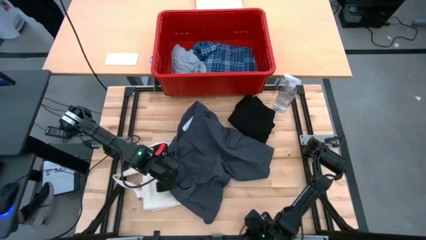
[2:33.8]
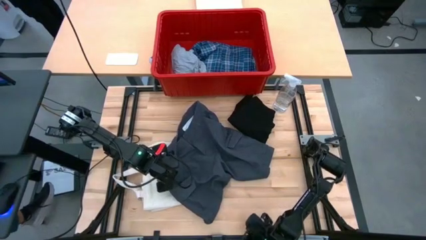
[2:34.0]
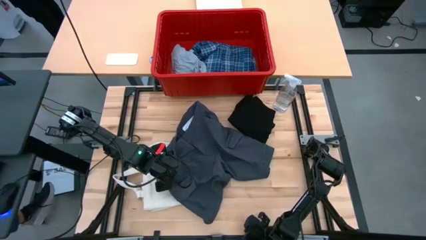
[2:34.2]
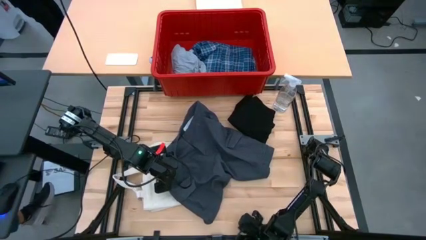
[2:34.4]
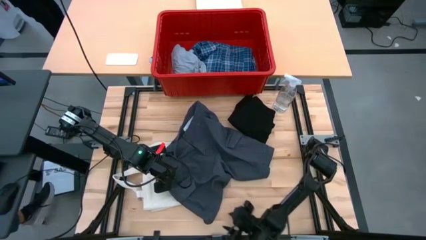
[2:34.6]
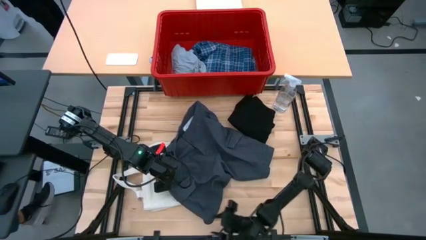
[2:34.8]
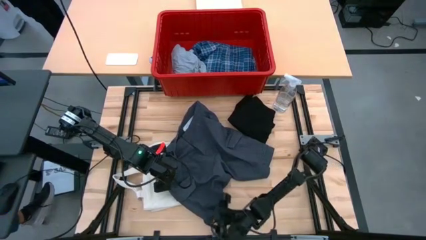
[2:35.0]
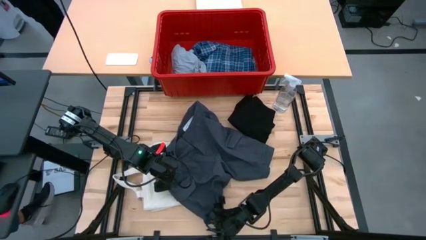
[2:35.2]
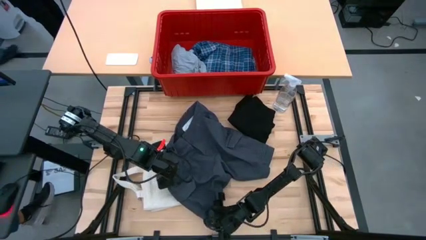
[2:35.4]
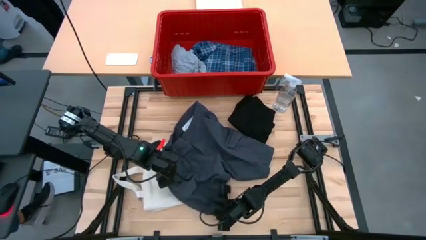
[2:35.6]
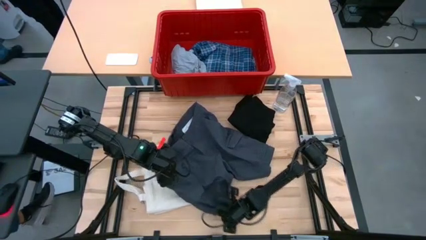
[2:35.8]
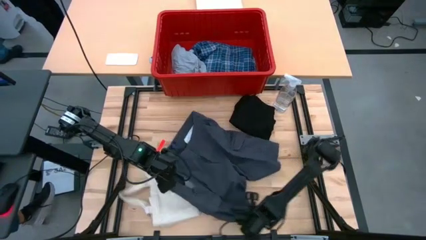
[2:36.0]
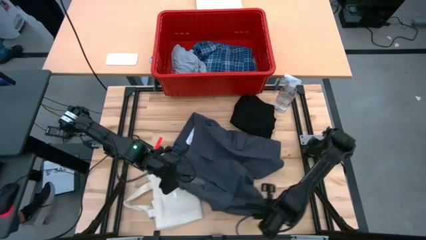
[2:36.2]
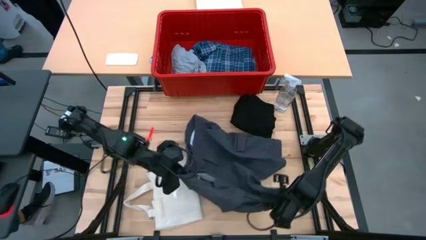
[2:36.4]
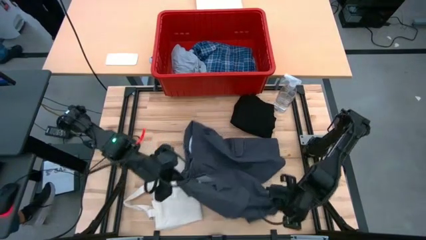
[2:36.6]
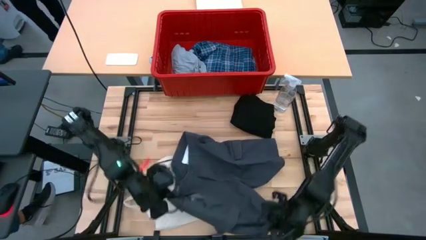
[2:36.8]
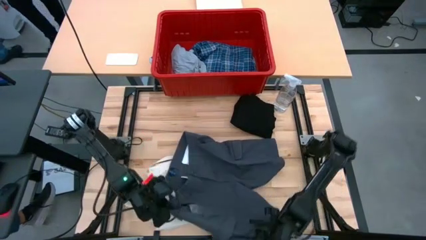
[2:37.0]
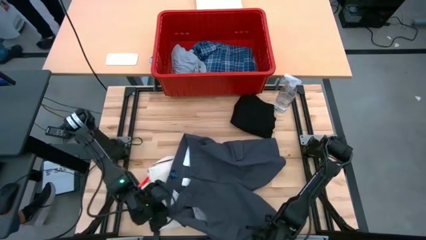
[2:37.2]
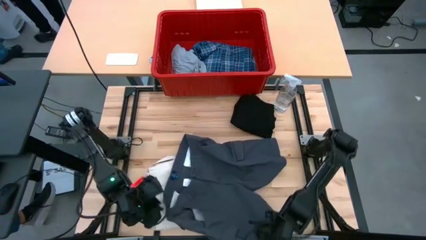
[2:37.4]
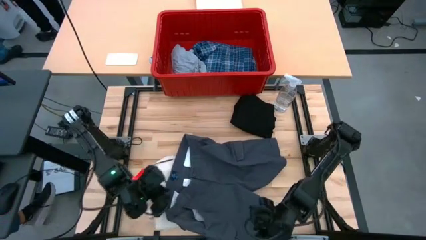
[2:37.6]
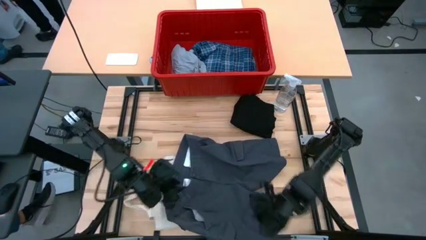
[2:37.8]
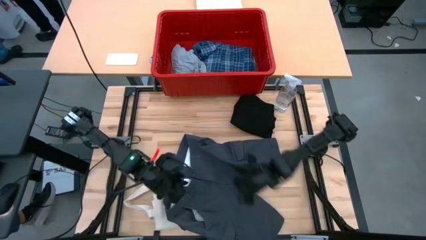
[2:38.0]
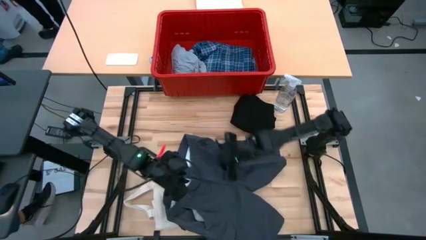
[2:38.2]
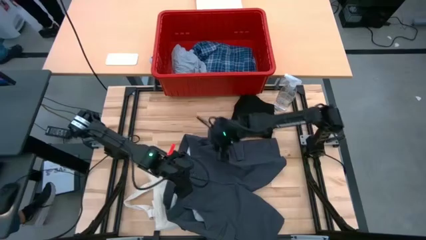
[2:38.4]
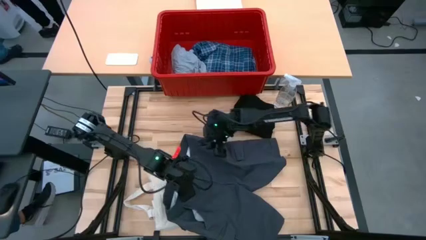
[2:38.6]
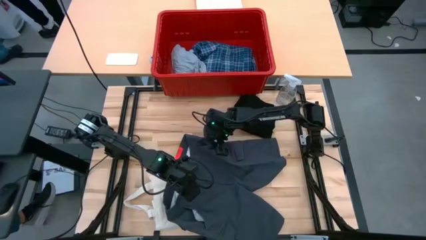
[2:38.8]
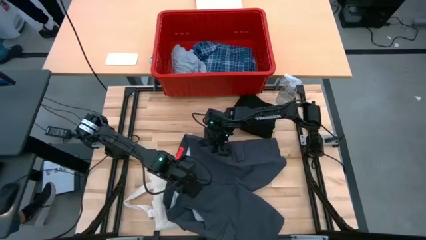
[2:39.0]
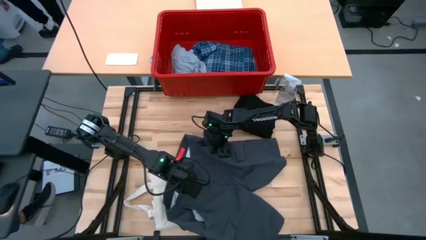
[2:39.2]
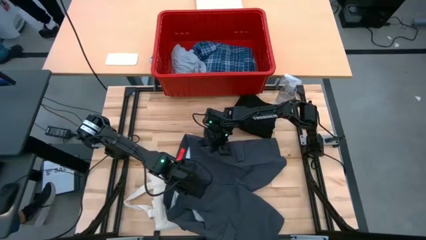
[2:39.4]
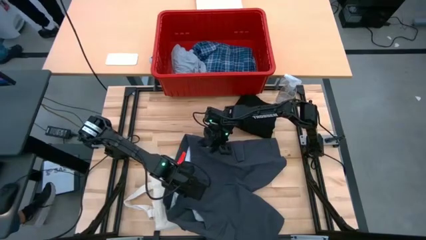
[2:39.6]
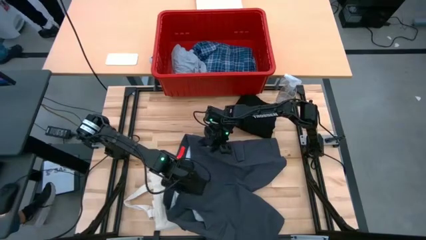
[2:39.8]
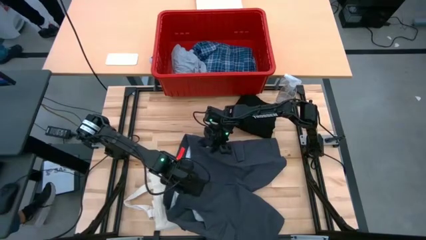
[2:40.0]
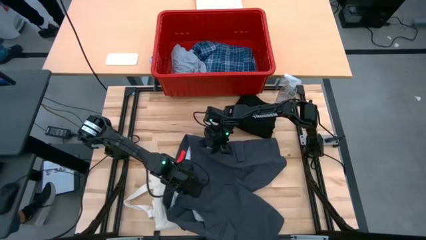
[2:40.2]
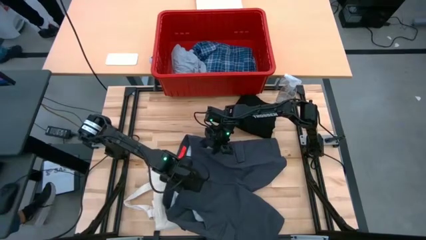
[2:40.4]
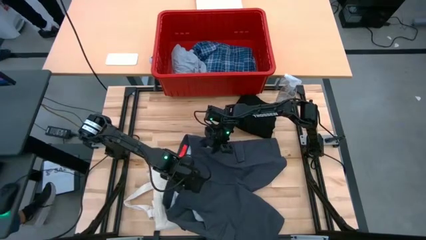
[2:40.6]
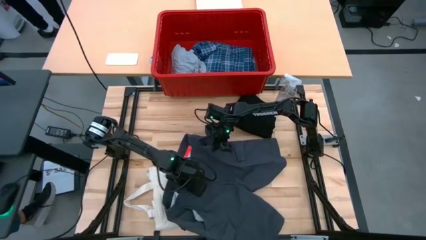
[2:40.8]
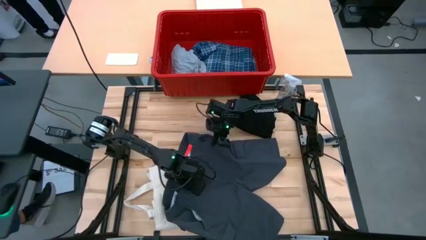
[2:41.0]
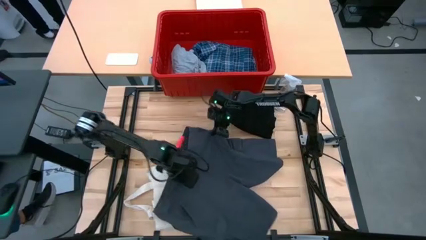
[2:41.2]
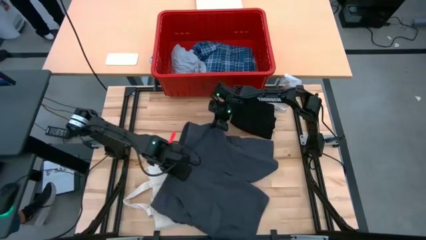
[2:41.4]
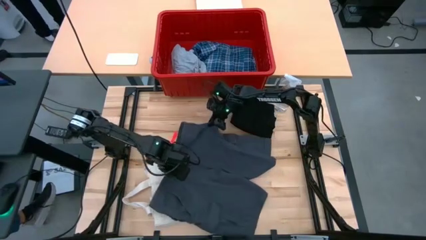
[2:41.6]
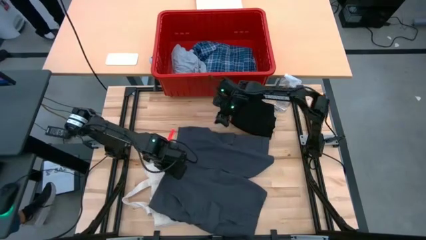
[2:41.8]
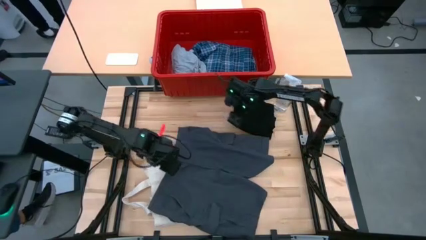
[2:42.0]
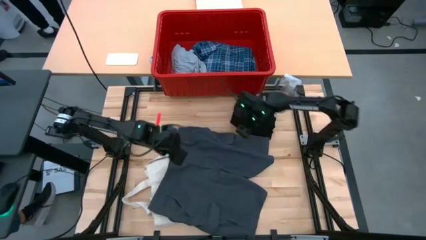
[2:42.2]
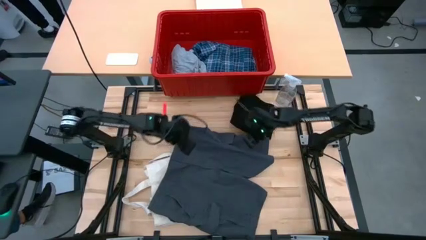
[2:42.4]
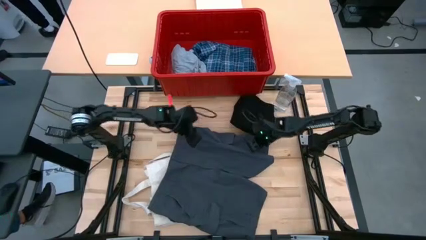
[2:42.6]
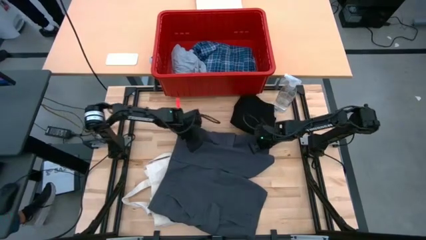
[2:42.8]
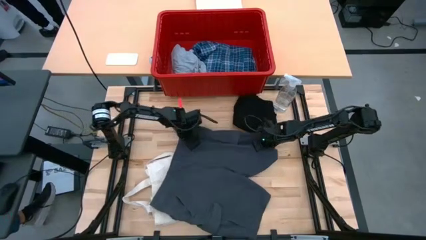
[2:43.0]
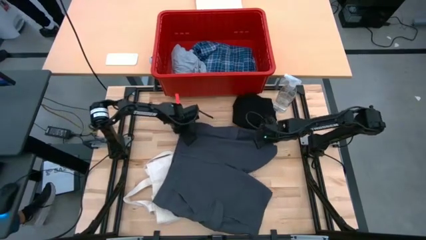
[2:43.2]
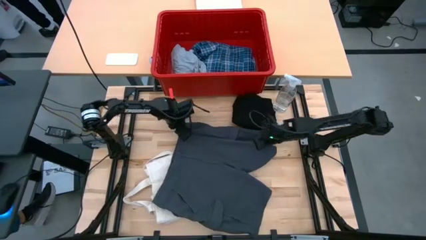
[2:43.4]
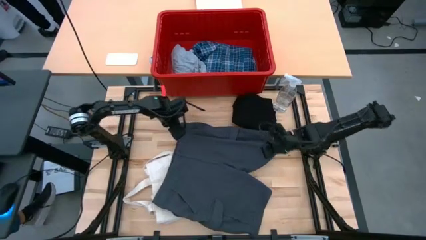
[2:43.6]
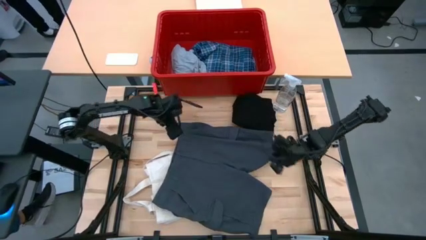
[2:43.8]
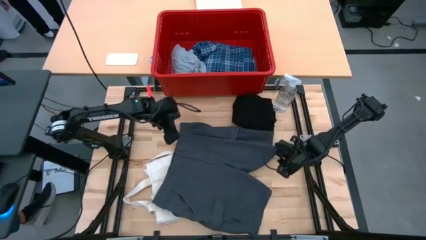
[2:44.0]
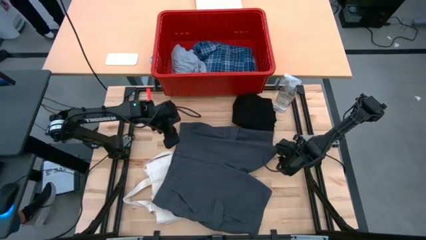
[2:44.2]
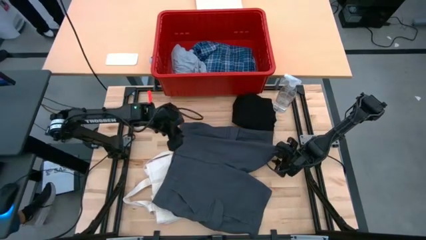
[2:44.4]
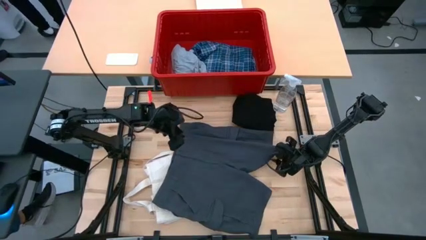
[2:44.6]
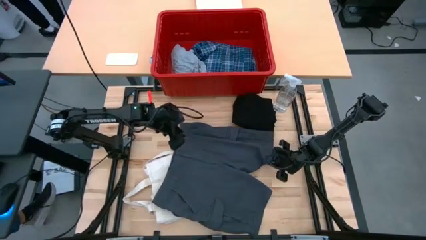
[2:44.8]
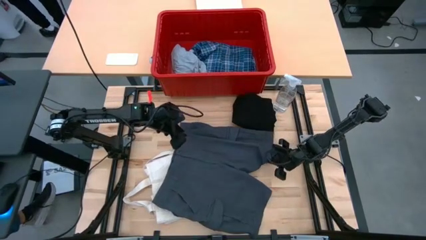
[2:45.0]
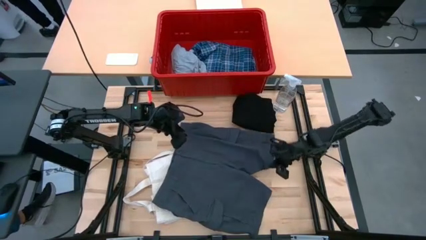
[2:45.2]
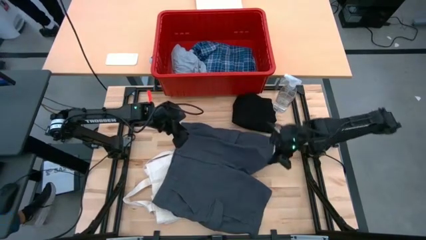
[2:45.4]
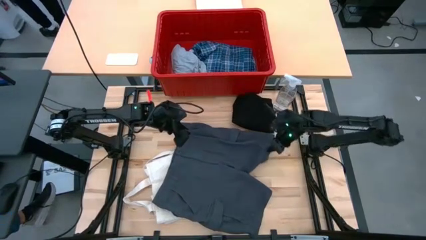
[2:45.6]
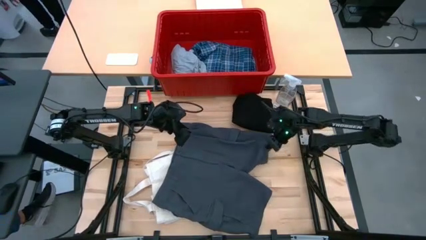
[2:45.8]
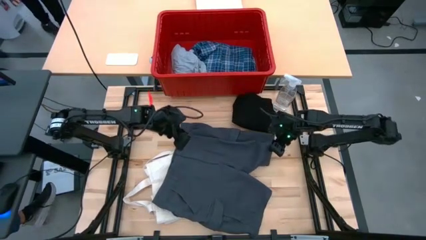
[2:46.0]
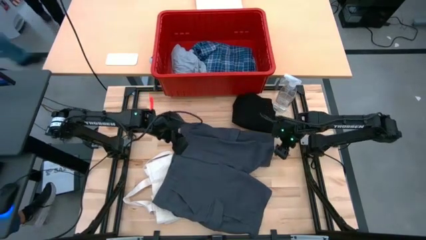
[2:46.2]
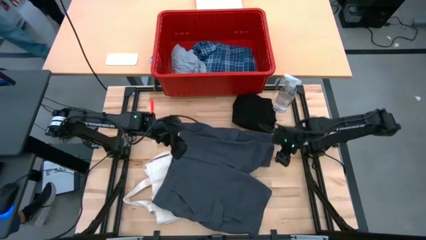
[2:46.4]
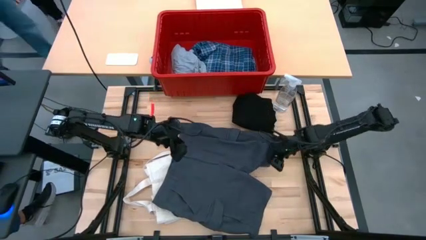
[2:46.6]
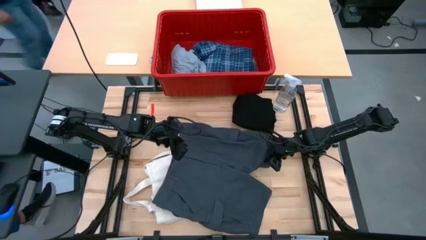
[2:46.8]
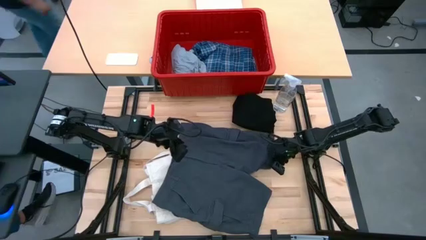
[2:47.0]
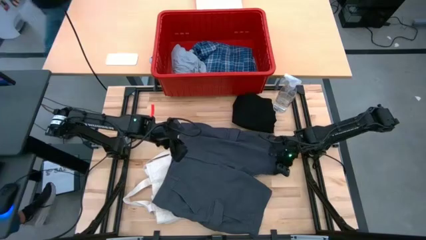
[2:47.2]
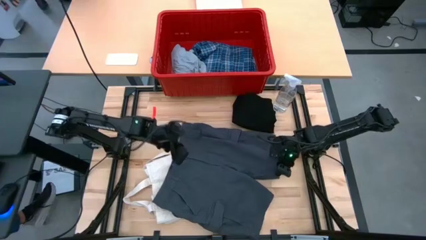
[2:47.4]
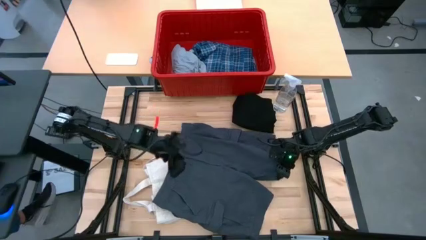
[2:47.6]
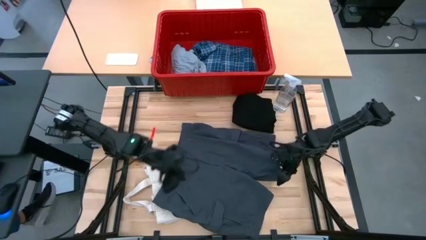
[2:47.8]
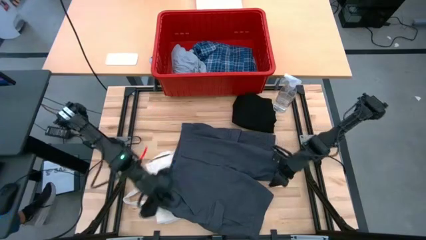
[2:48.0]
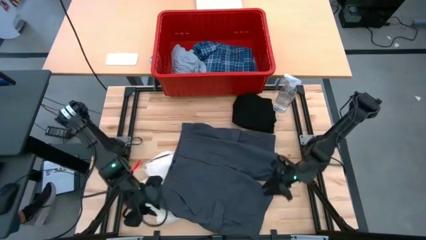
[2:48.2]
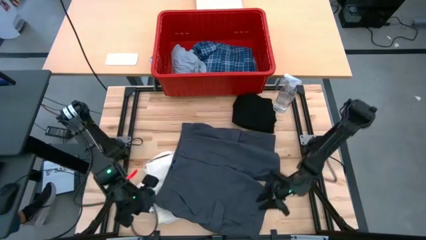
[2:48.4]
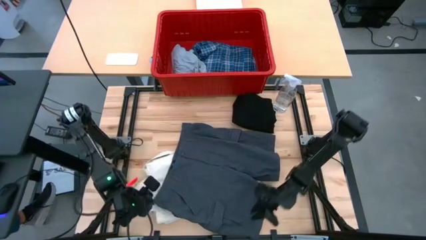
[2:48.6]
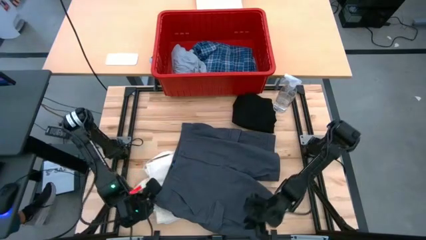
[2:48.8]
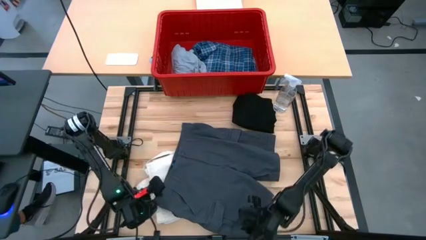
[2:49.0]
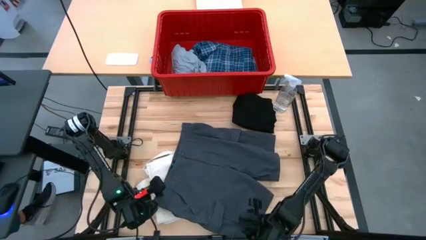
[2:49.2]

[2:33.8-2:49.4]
Task: Fold Laundry from Bin
Fold the gray shorts
